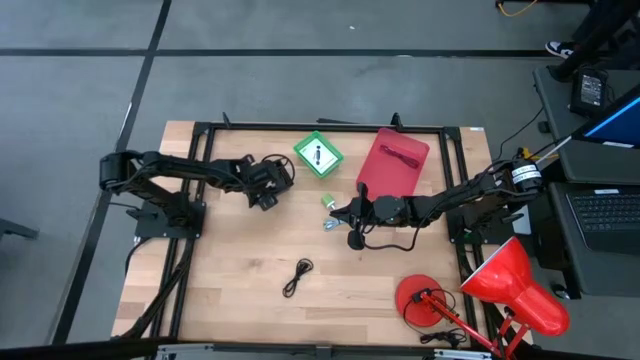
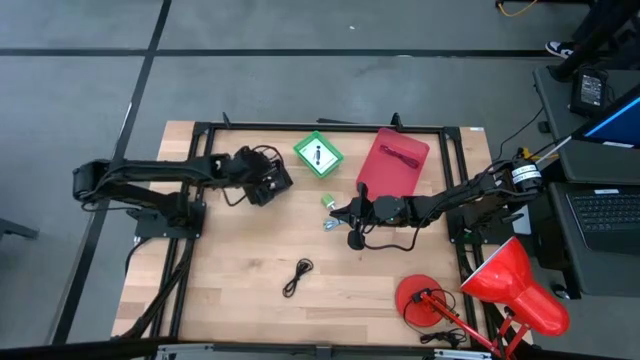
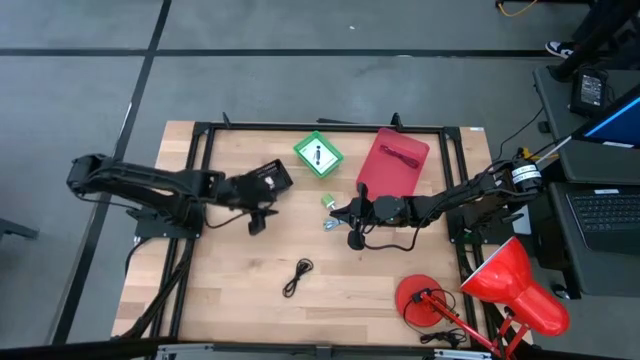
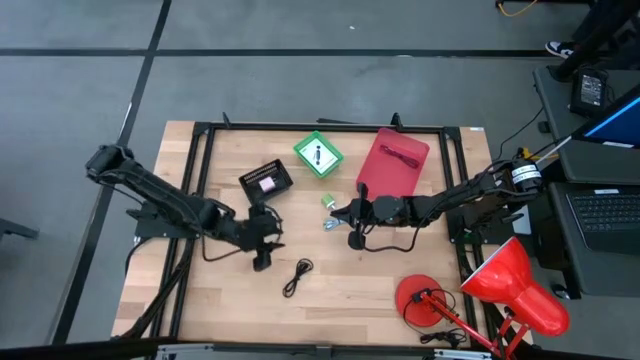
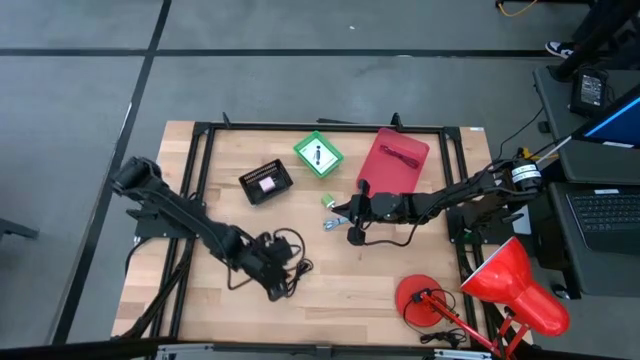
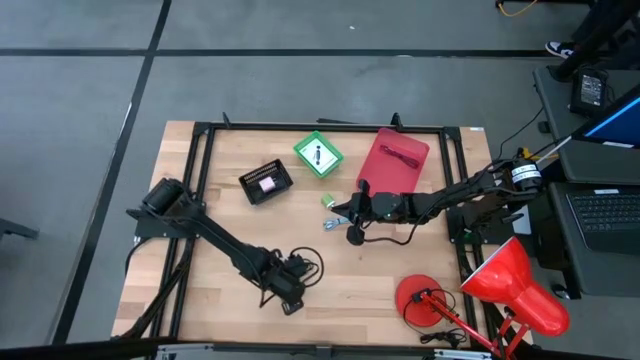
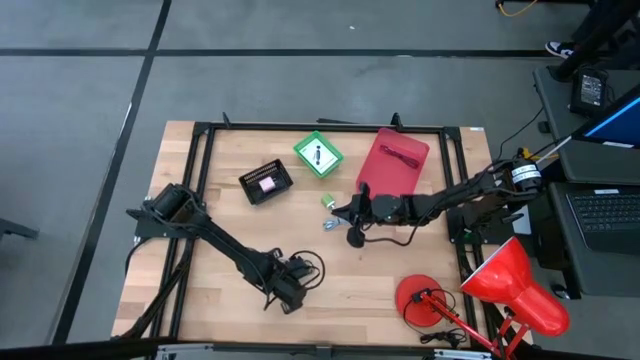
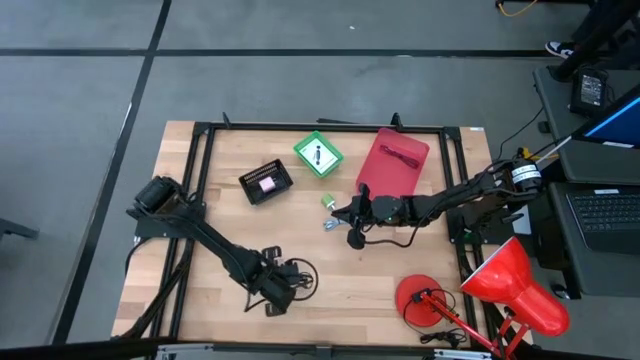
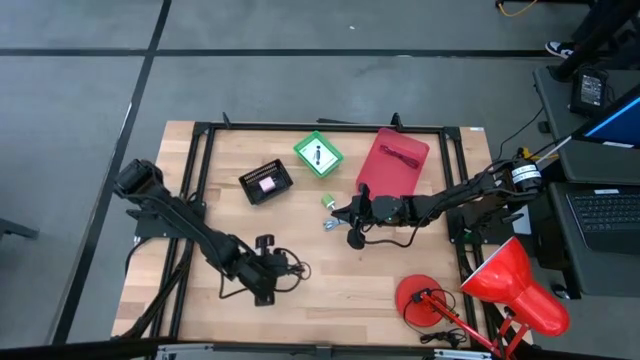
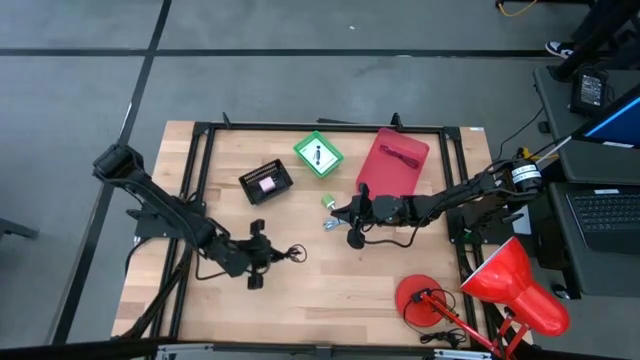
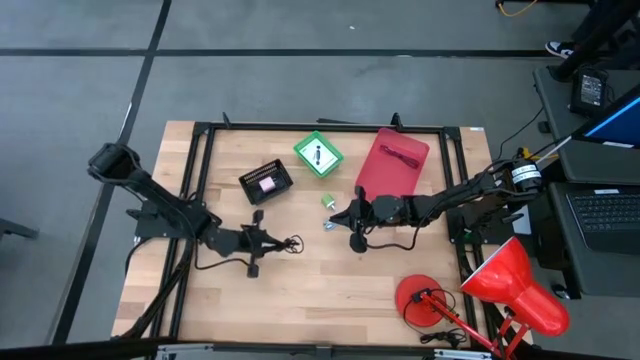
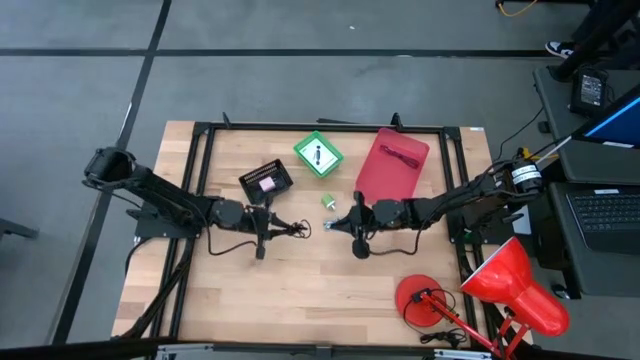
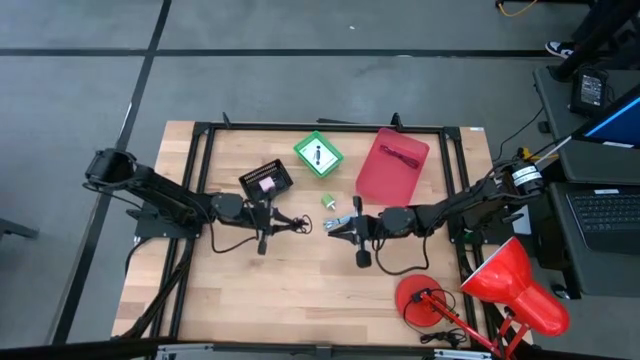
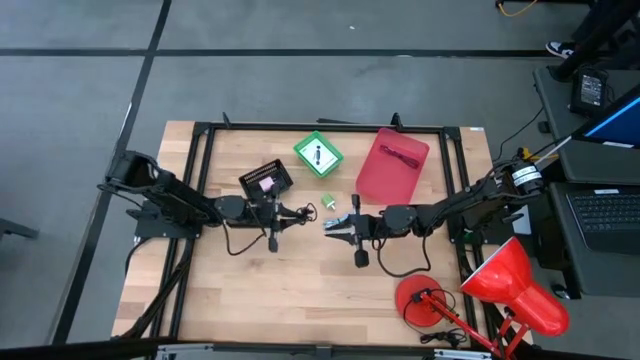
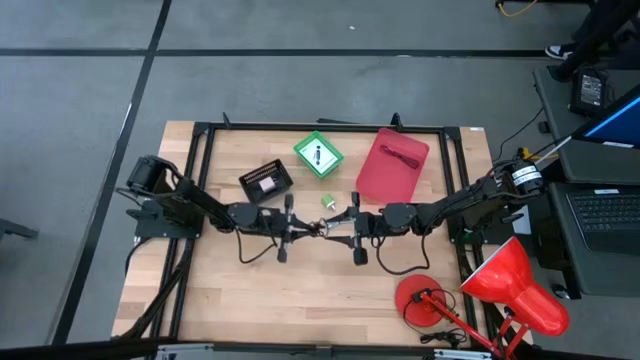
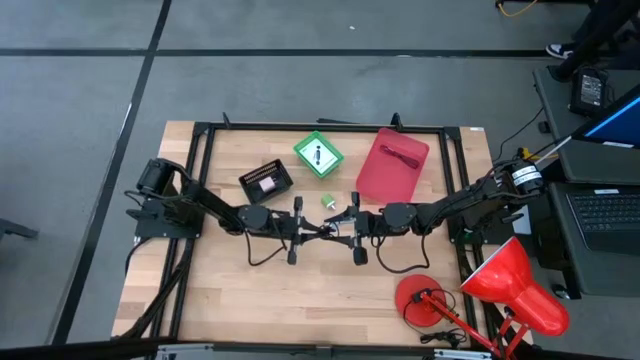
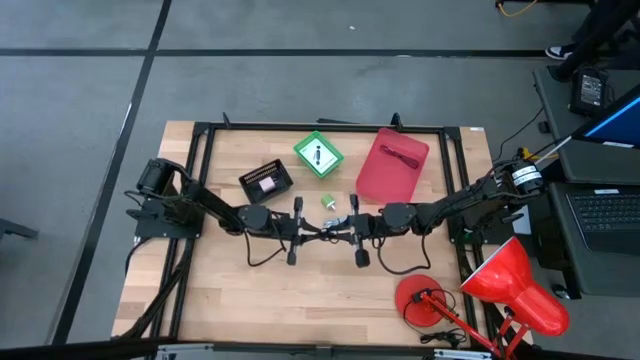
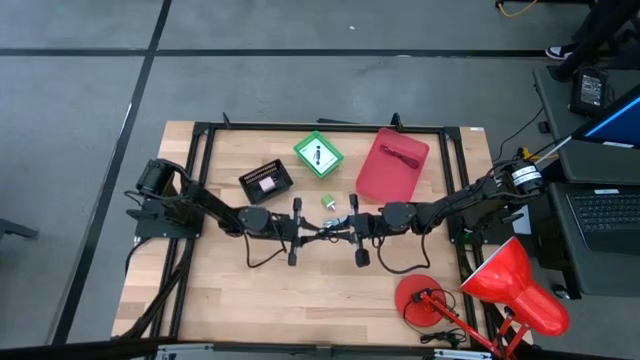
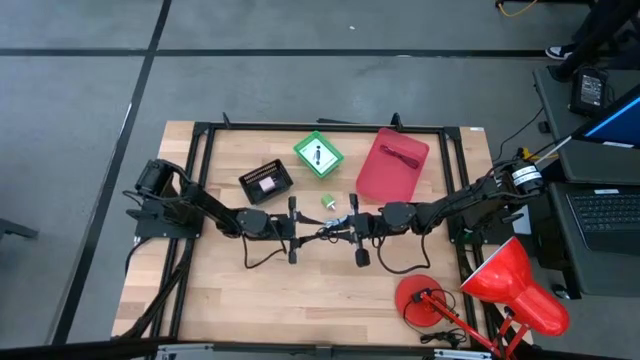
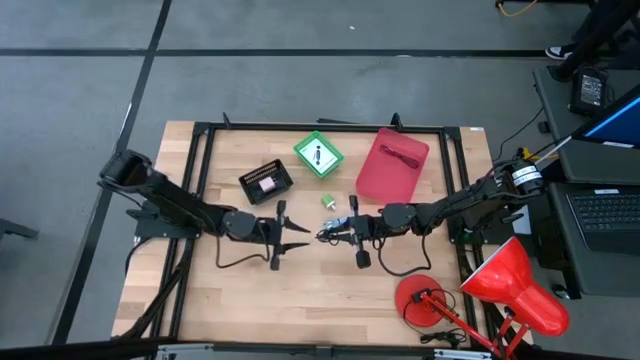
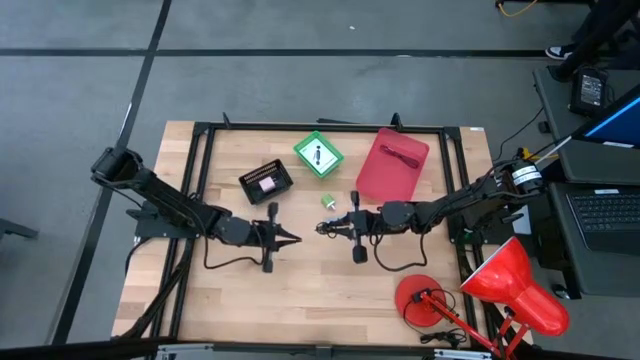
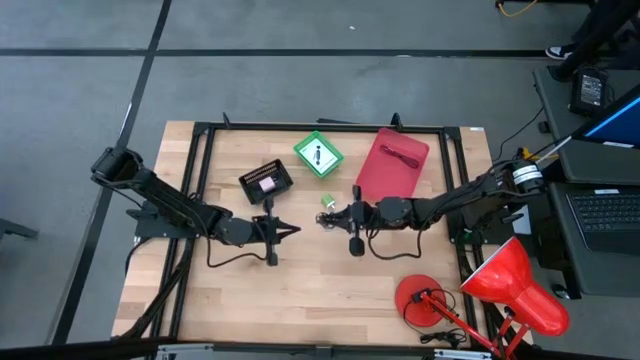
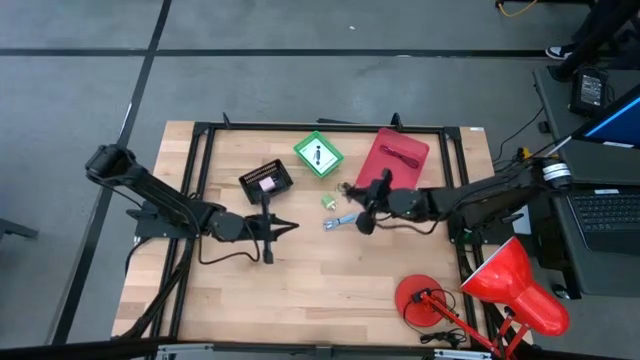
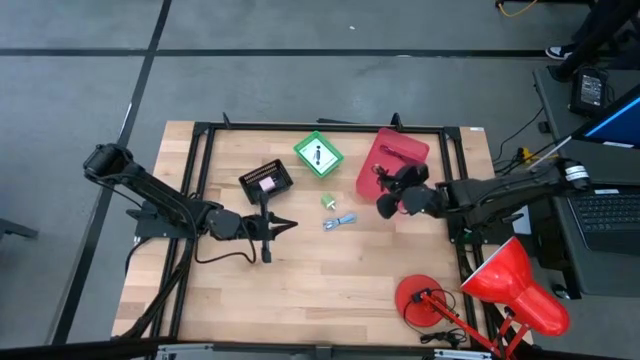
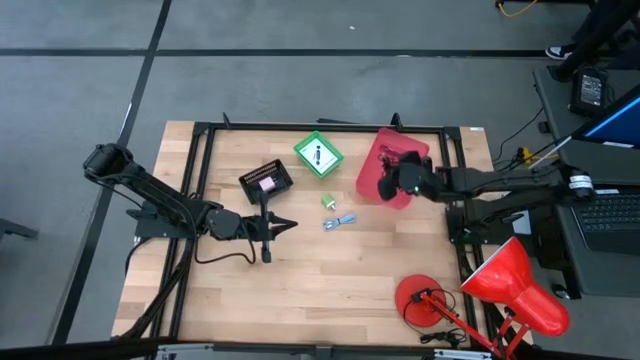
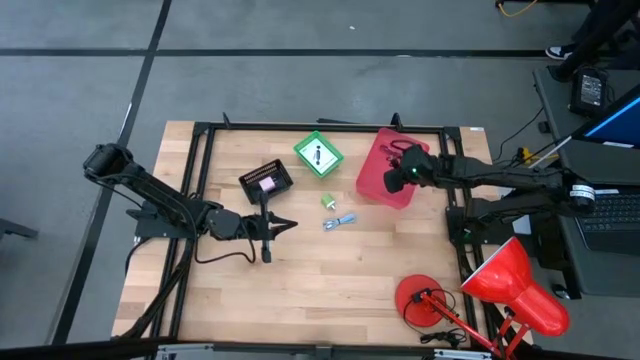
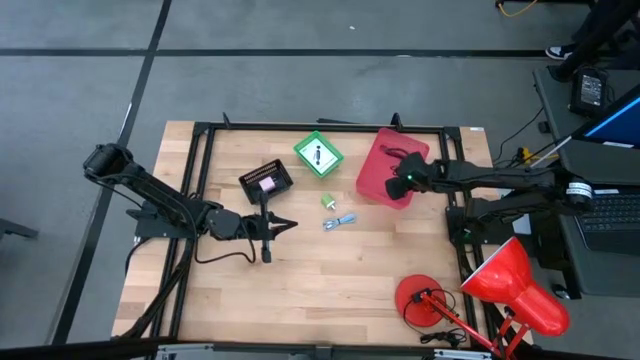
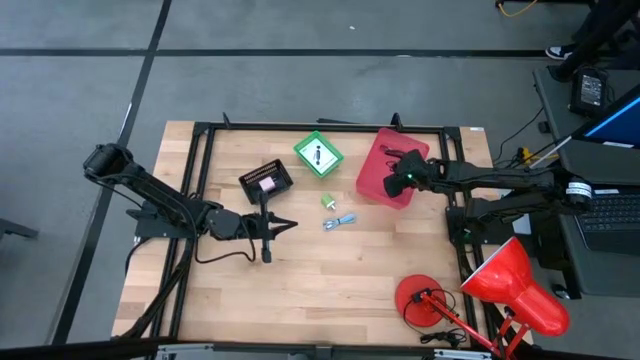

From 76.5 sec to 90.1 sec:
Task: Pick and place items into bin
Put the black charger cable into the pink bin

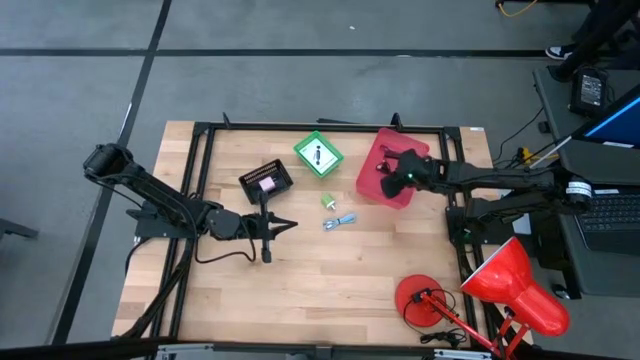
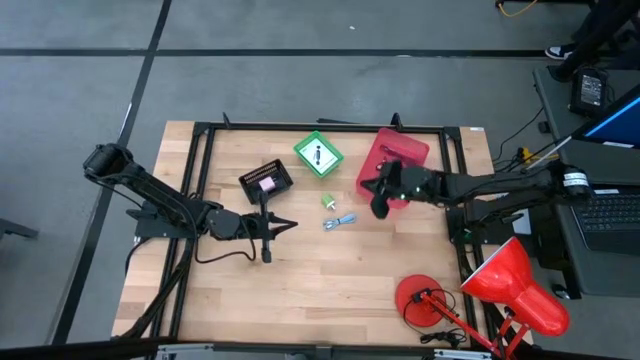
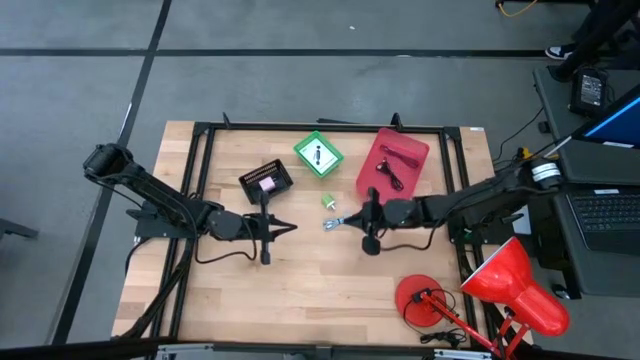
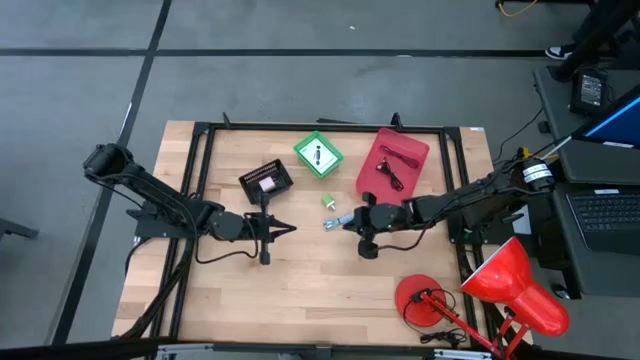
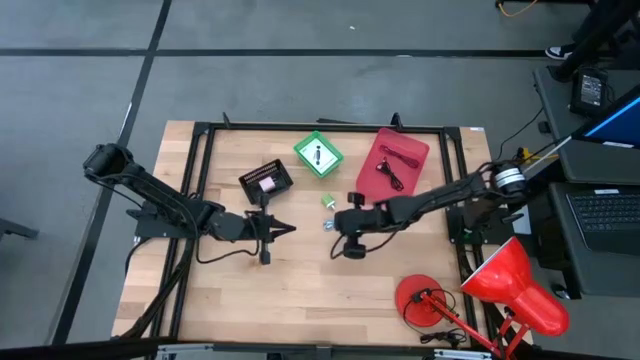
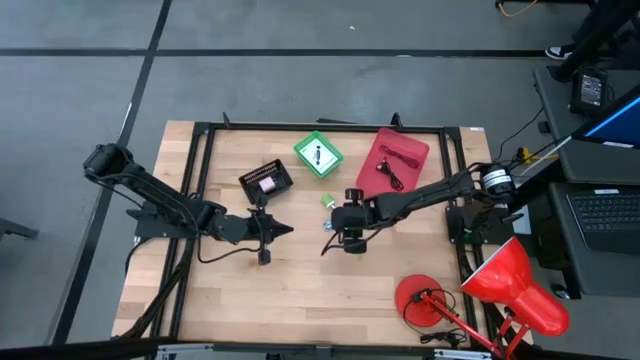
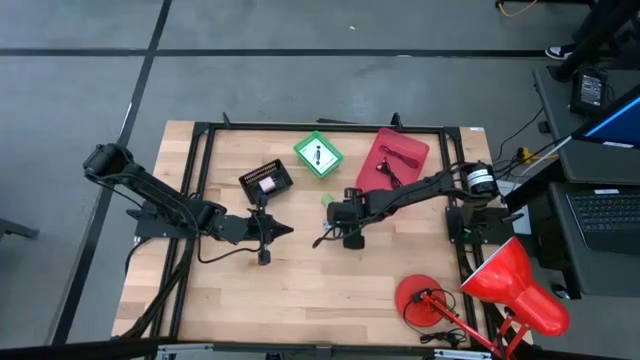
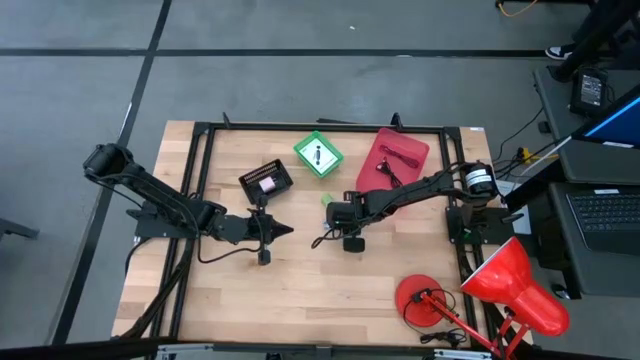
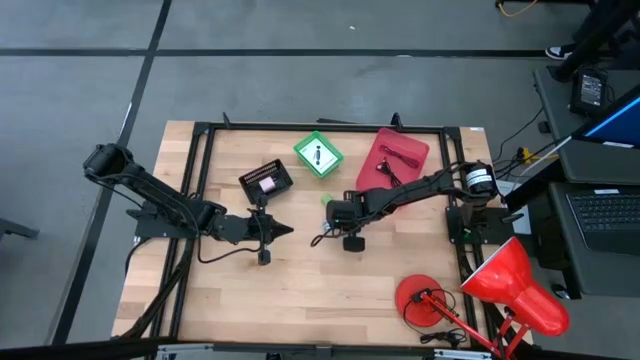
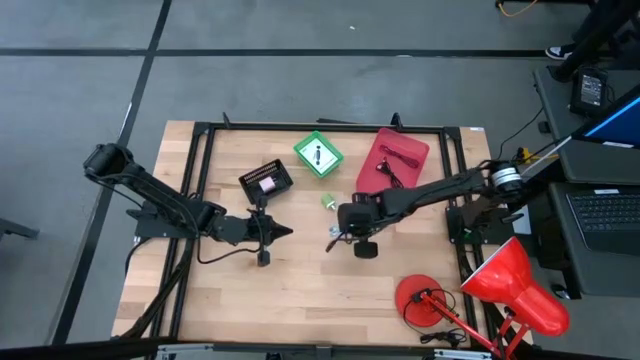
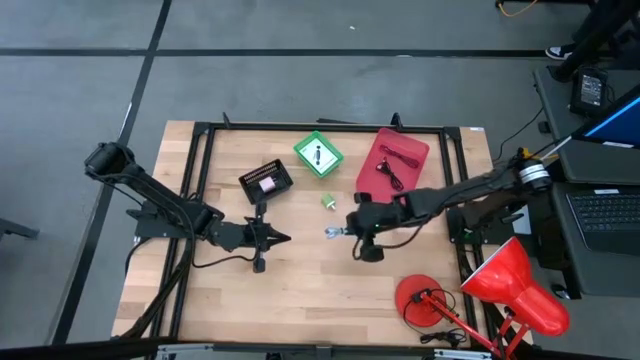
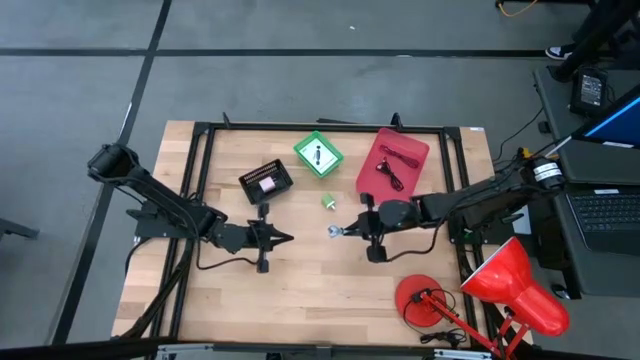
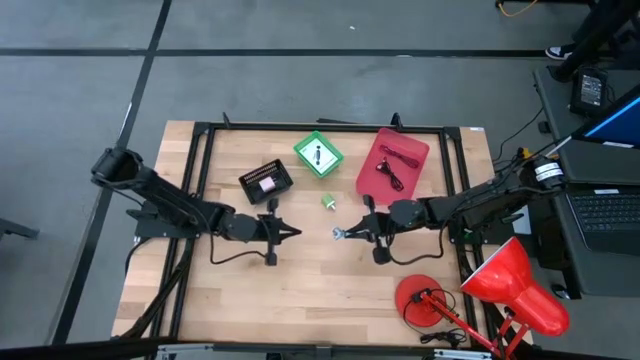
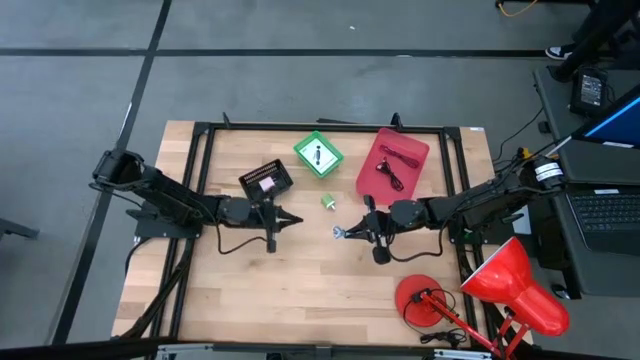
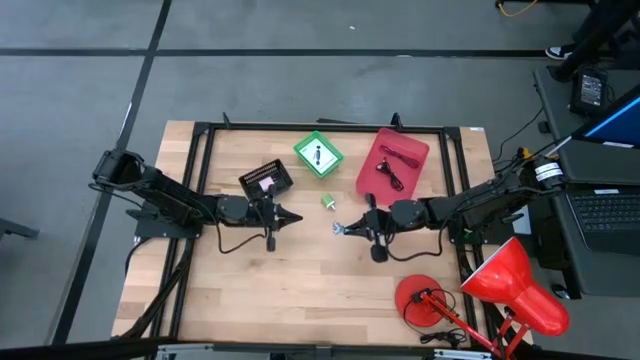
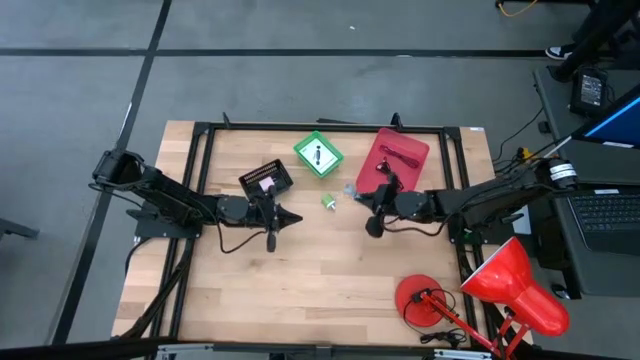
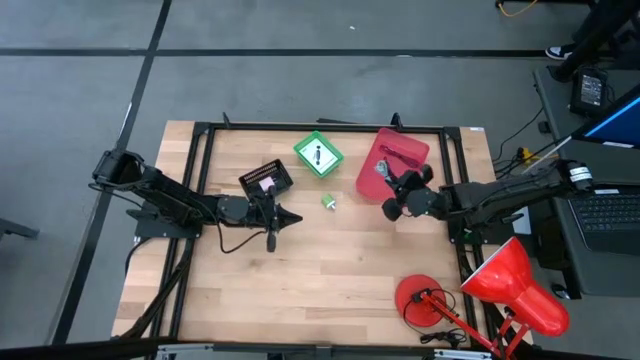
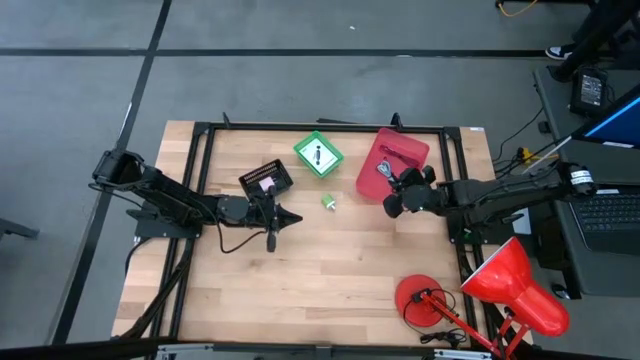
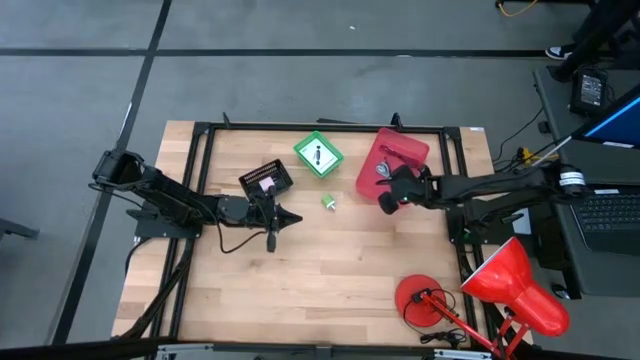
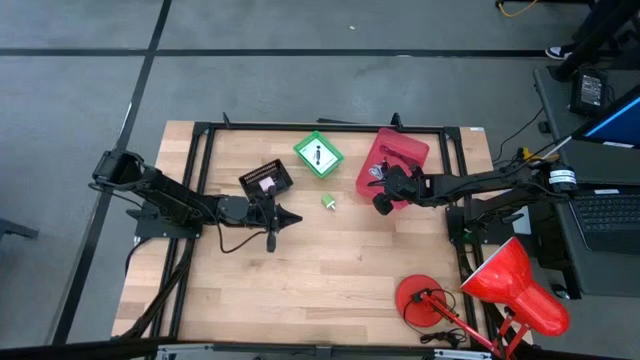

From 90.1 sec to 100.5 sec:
Put the blue charger cable into the pink bin
